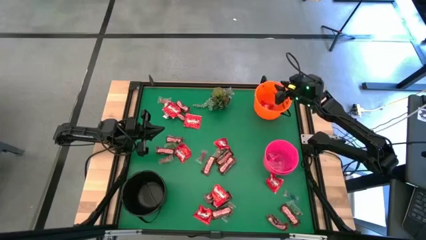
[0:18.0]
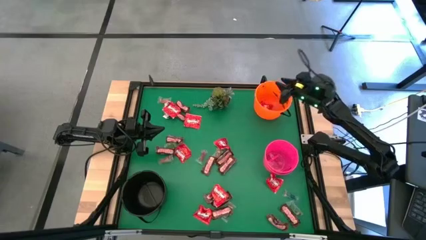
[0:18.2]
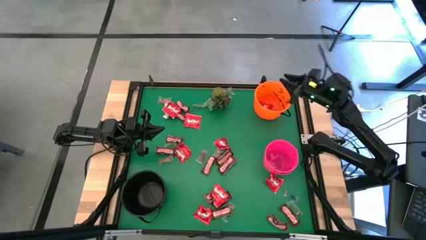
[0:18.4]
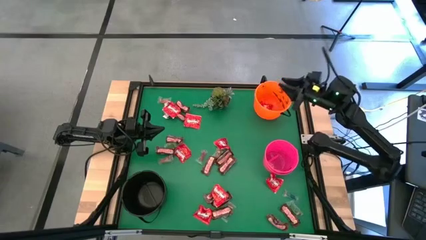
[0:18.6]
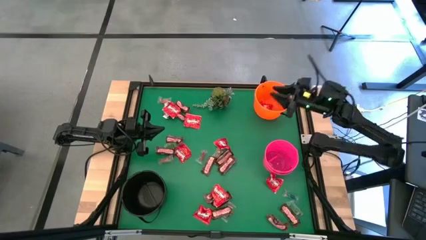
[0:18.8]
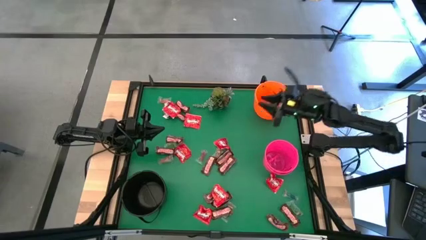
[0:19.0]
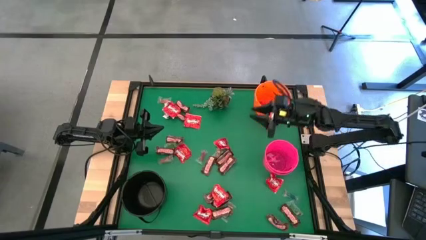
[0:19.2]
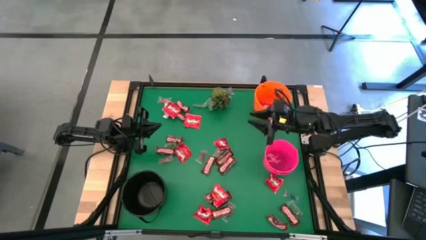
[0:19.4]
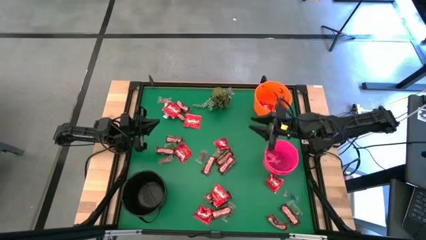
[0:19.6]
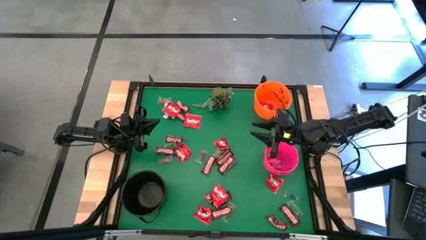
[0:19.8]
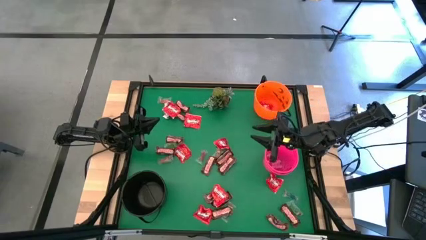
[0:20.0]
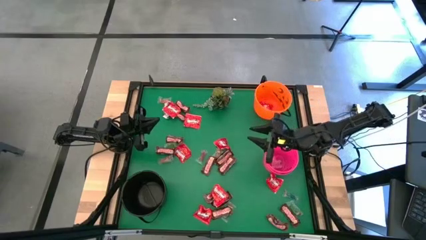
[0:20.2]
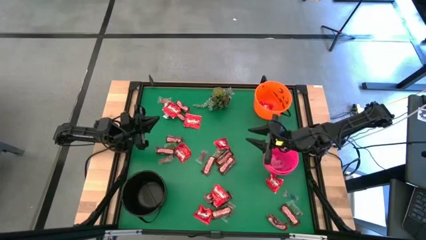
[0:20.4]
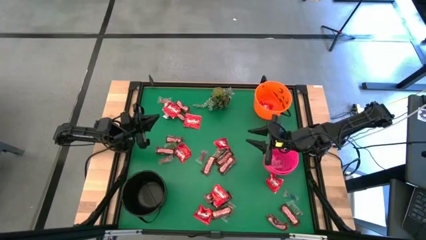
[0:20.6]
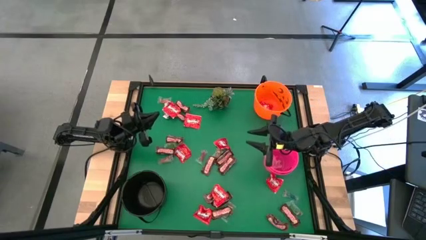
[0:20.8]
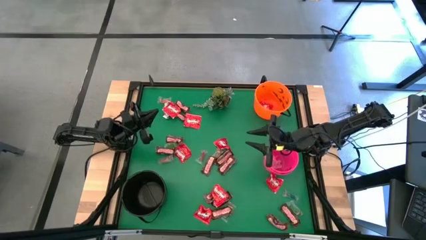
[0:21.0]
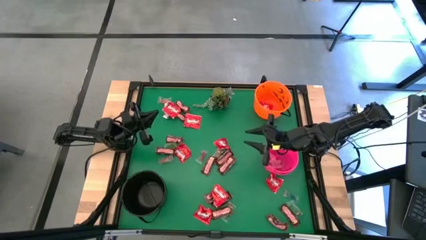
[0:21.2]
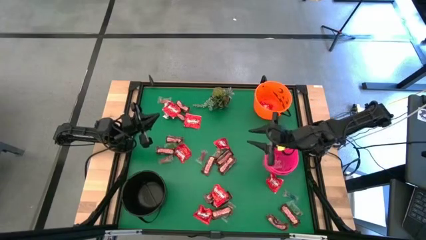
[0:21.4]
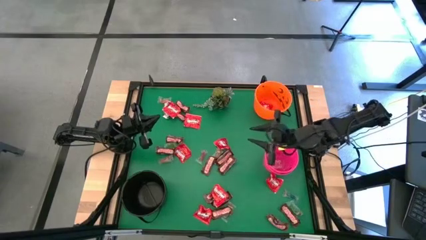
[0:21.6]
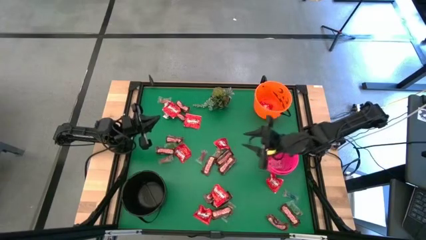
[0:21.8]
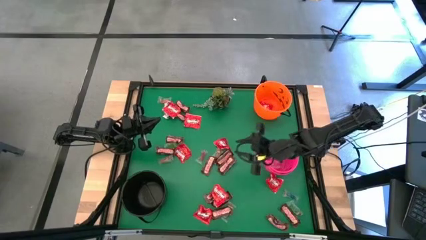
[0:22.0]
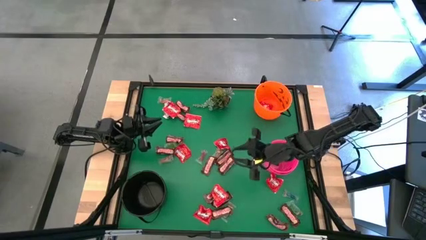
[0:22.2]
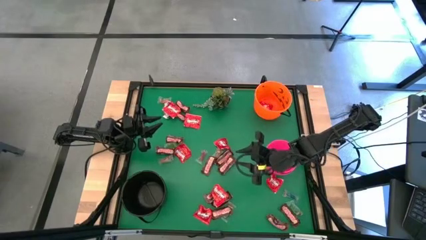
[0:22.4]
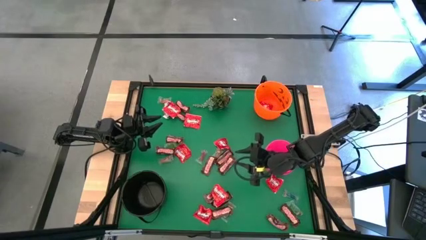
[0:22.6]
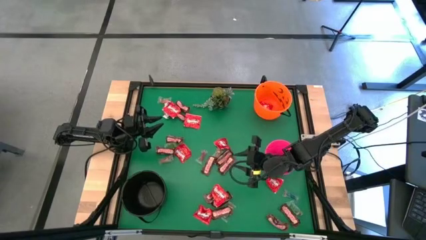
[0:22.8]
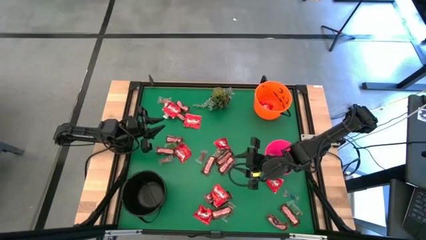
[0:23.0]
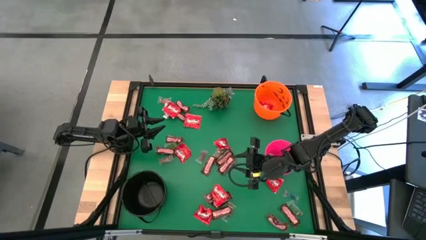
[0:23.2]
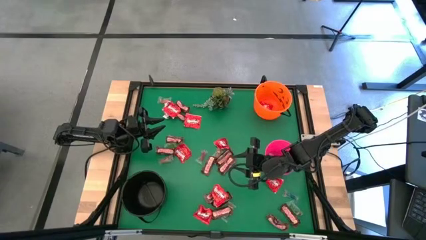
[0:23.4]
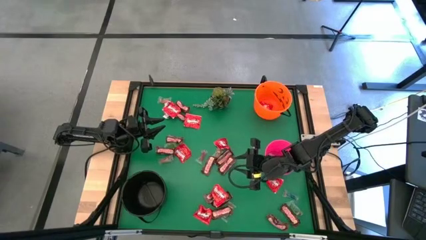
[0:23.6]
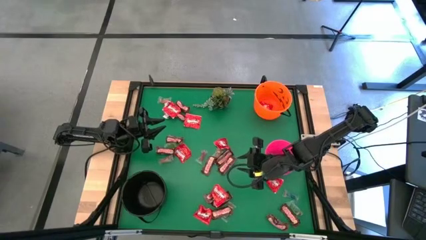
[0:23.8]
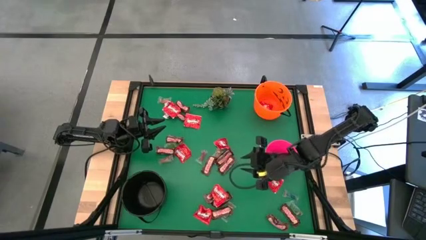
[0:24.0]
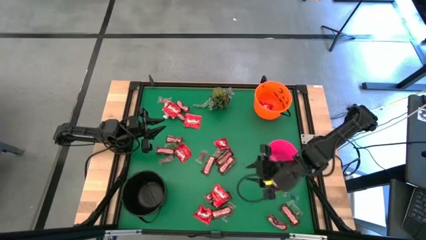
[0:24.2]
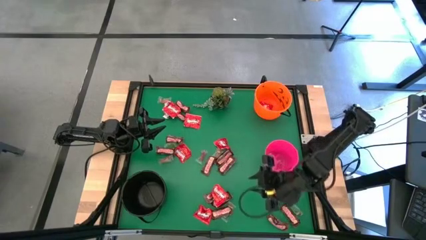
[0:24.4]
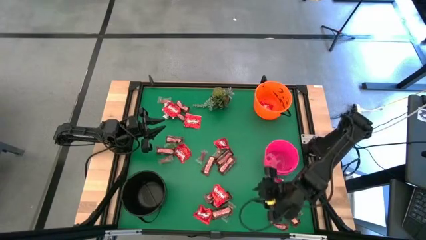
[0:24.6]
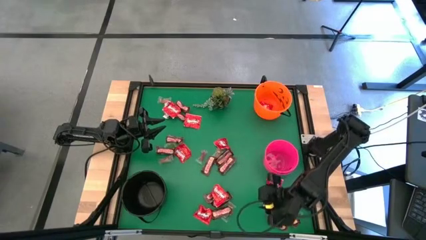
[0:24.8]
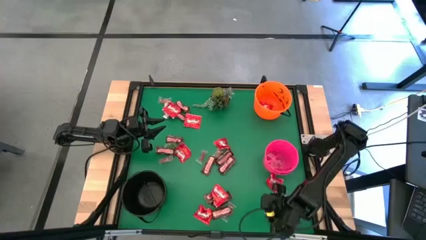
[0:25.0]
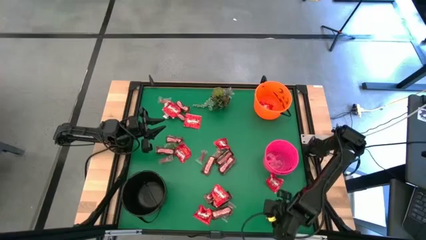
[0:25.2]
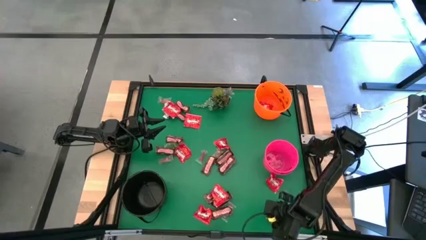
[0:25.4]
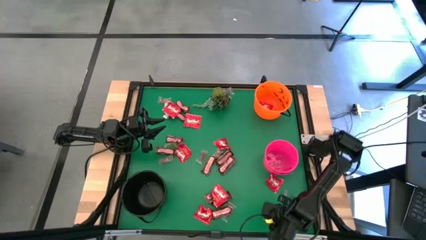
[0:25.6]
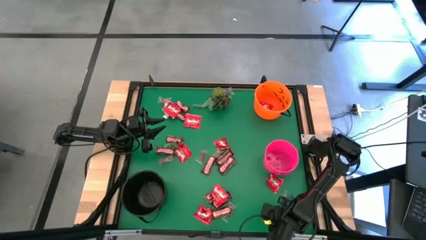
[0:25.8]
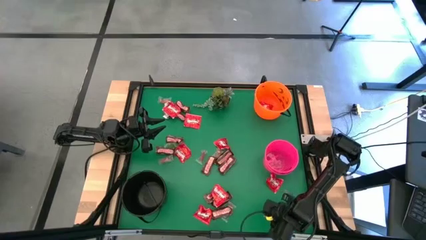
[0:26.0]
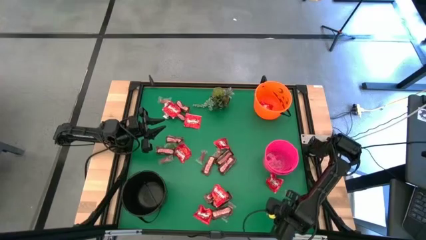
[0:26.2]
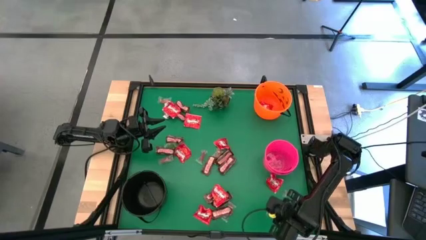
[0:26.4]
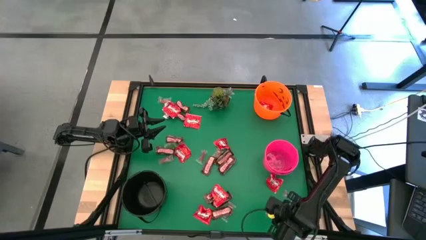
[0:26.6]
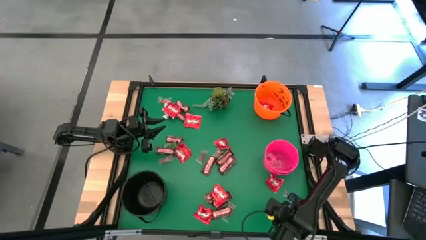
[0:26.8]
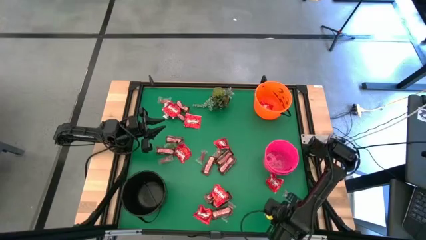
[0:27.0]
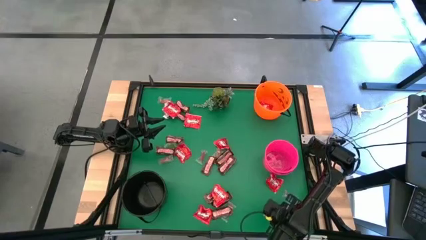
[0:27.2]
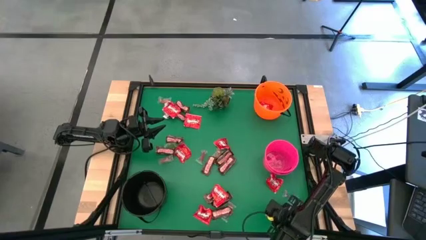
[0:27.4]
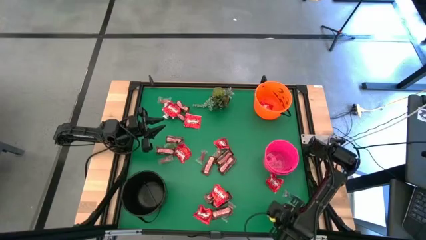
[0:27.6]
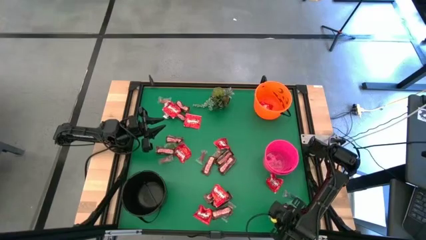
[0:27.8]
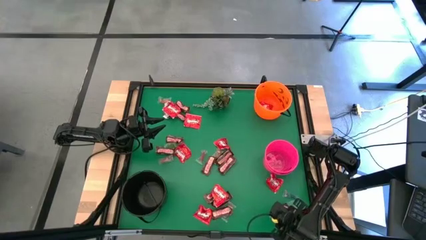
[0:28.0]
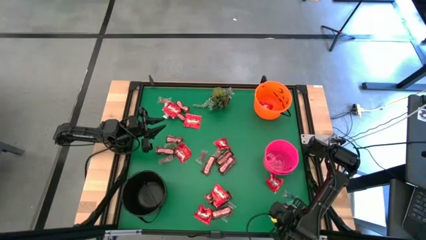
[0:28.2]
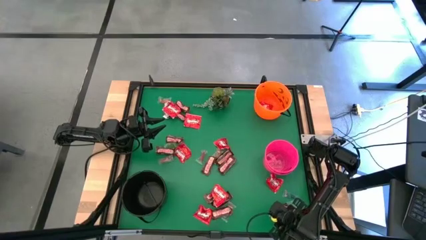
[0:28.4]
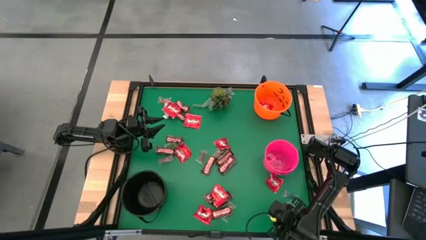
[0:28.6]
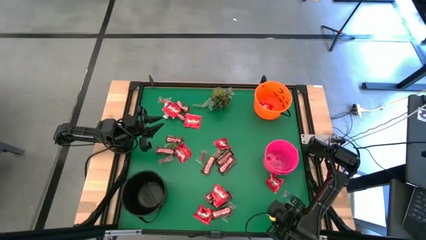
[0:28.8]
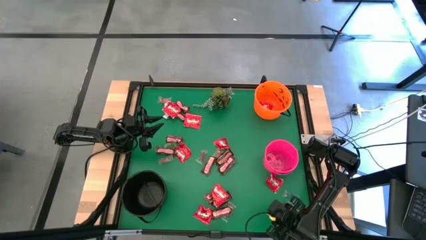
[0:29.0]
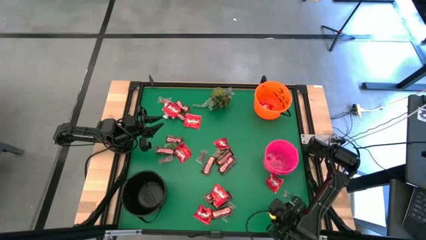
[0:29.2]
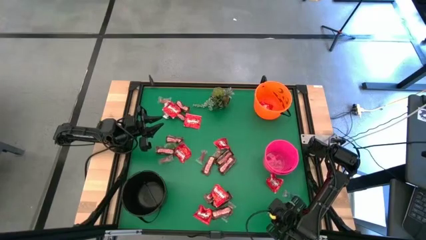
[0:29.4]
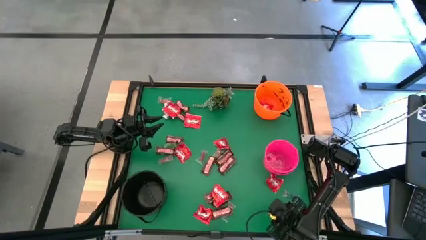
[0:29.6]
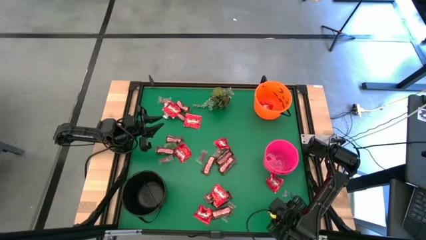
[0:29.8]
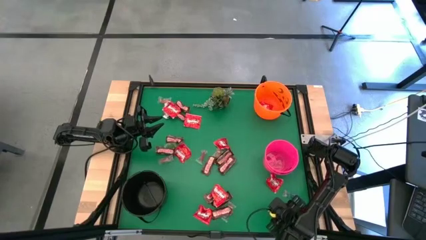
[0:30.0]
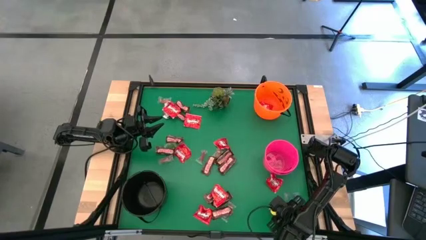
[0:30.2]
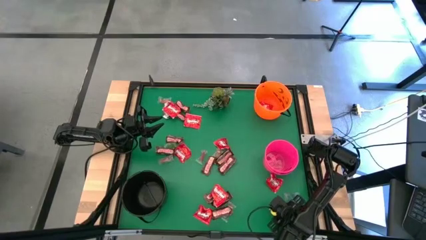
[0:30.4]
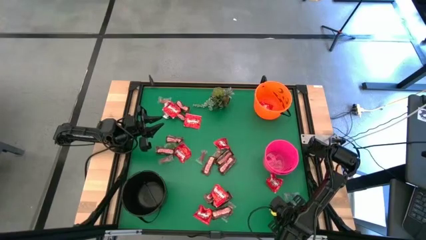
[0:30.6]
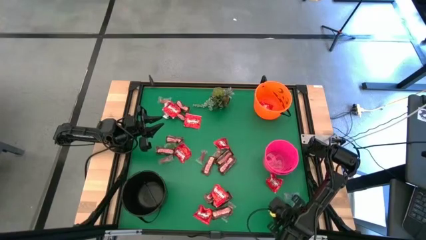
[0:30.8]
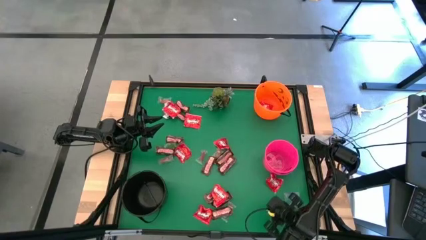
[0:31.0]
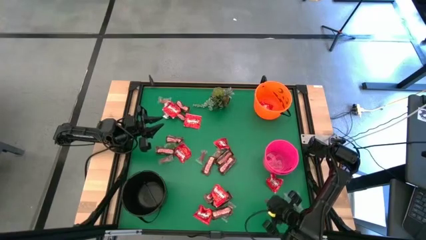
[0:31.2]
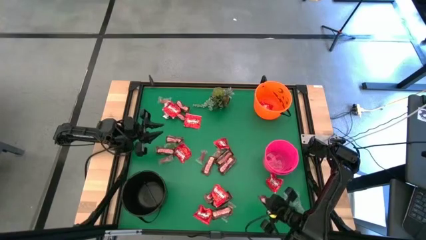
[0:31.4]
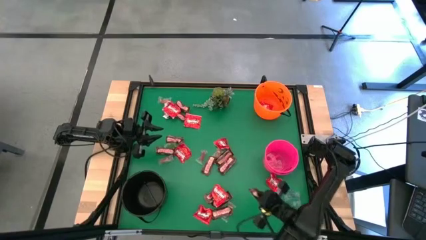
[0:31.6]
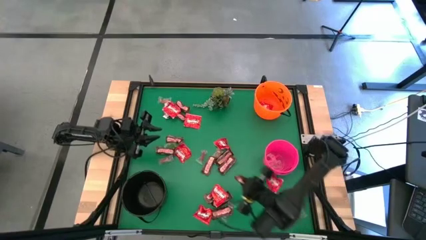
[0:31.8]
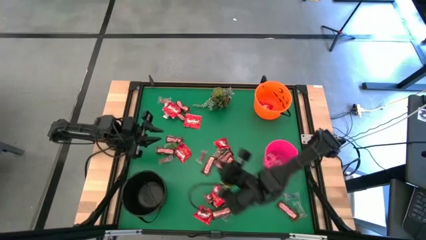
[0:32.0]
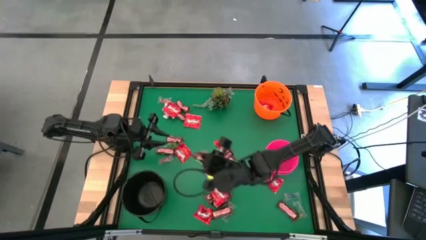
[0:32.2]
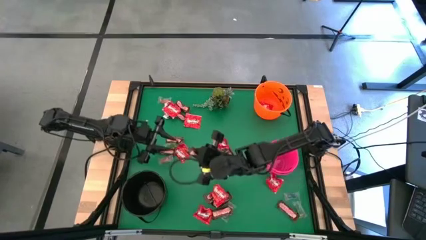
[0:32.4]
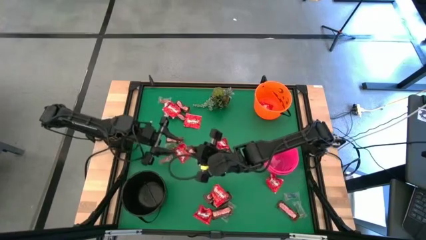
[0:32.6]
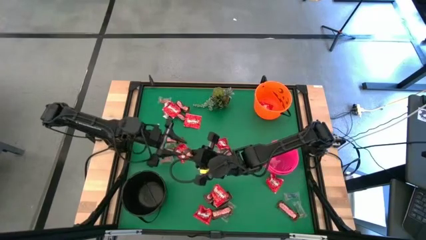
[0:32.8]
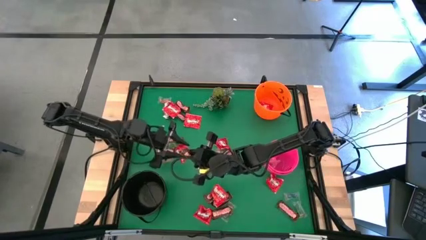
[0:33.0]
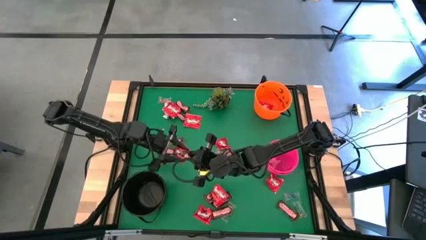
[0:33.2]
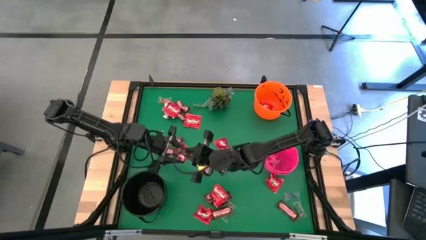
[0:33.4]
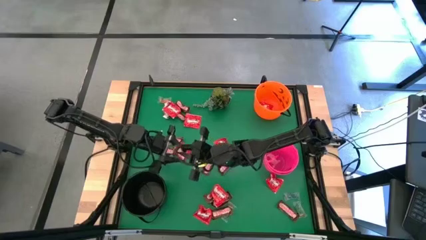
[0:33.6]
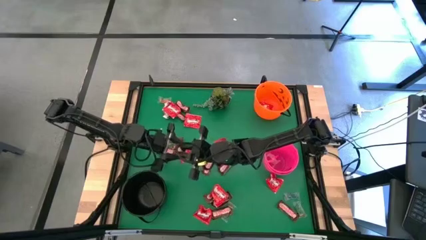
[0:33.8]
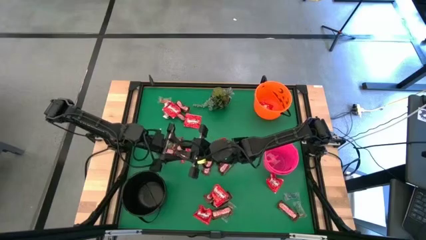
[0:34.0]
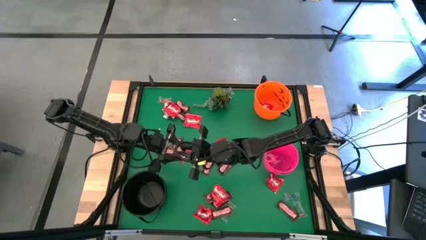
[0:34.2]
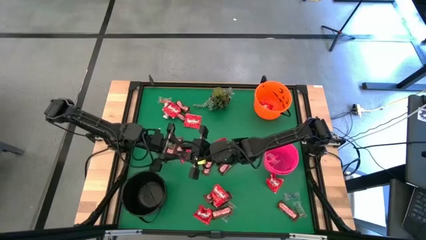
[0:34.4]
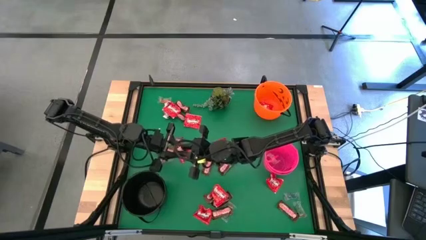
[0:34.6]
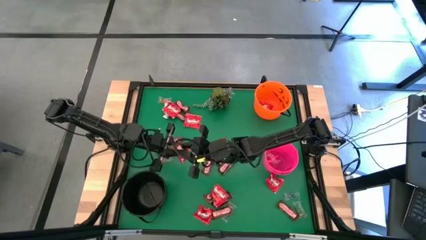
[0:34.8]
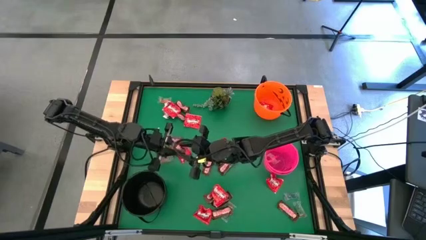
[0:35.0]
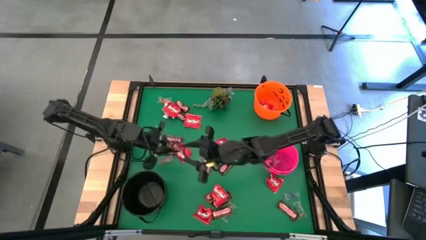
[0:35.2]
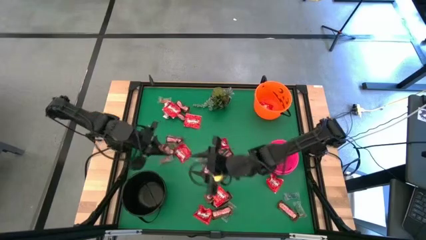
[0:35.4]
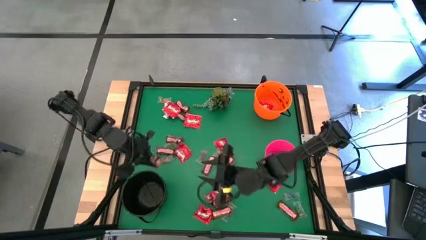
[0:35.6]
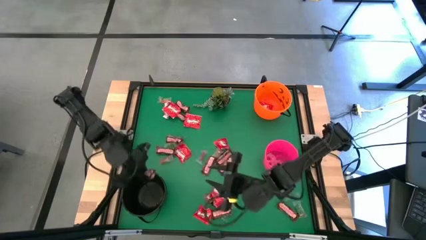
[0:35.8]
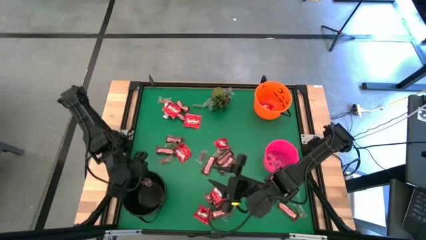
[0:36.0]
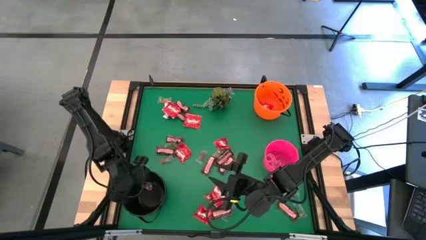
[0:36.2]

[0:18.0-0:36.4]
Task: Sort candy
Put the brown chocolate bar into the black bucket
